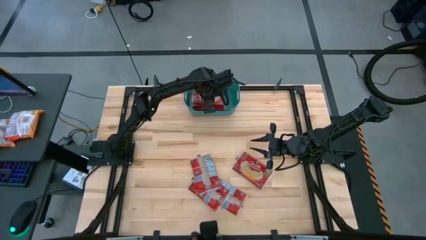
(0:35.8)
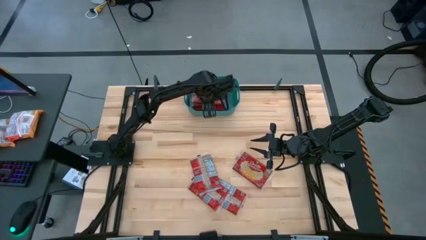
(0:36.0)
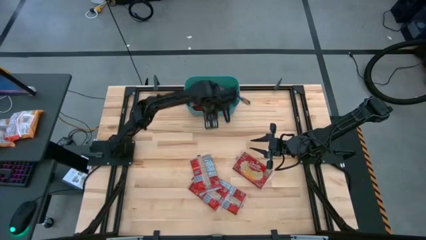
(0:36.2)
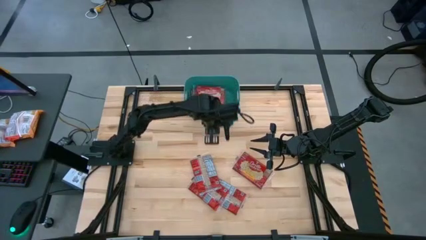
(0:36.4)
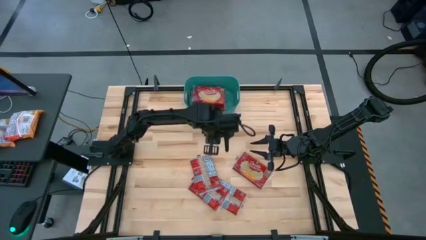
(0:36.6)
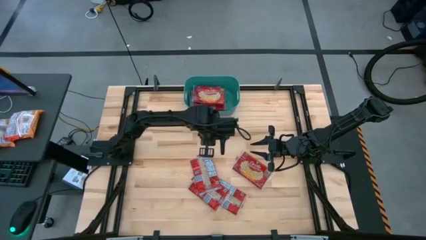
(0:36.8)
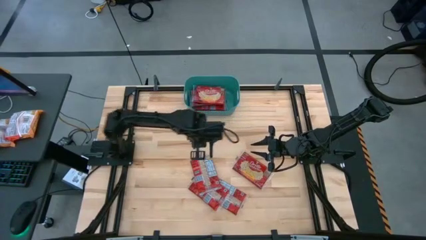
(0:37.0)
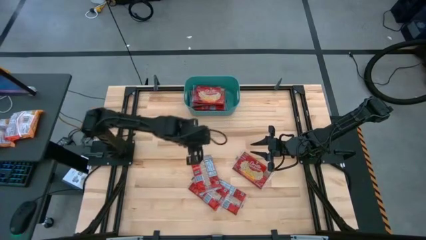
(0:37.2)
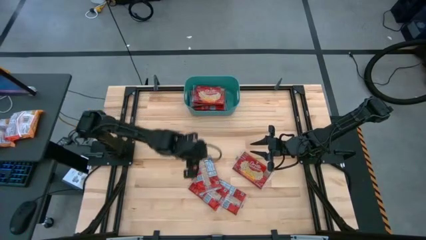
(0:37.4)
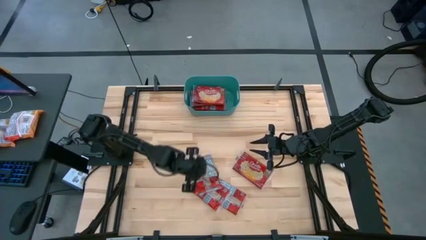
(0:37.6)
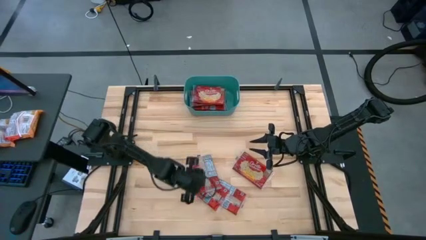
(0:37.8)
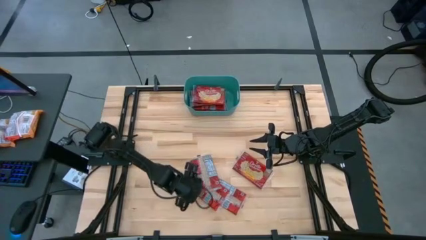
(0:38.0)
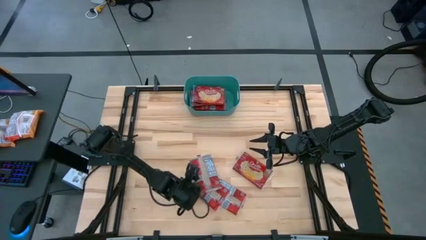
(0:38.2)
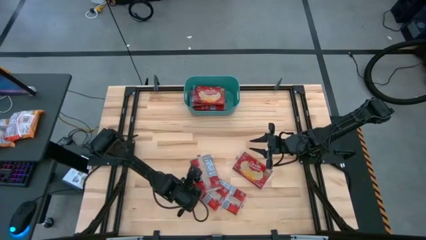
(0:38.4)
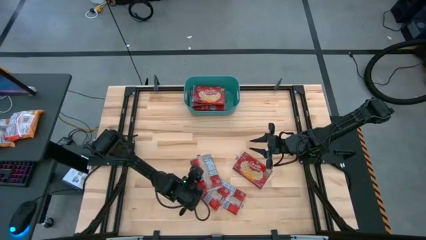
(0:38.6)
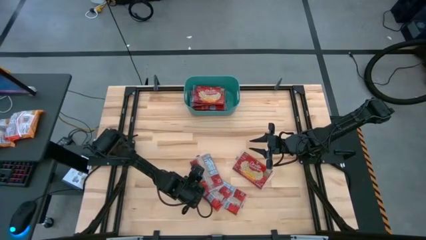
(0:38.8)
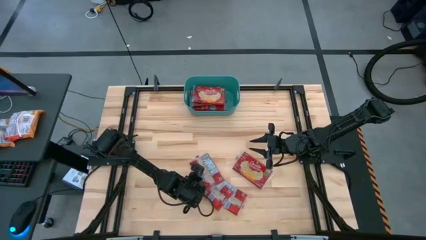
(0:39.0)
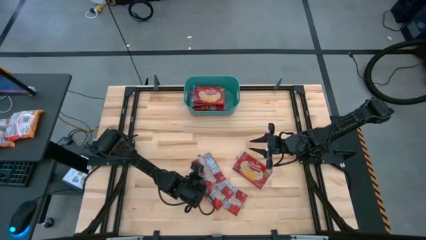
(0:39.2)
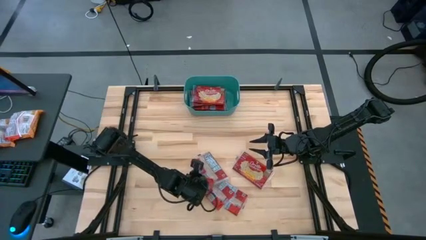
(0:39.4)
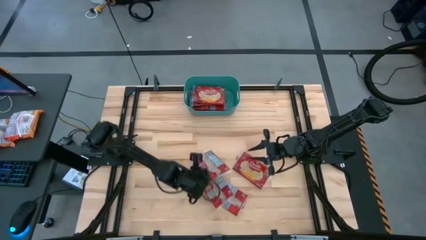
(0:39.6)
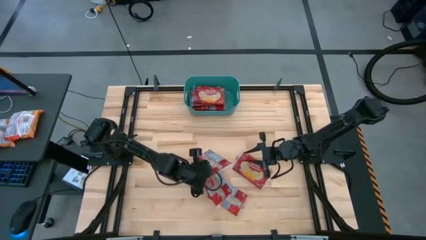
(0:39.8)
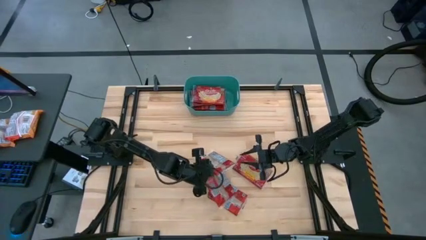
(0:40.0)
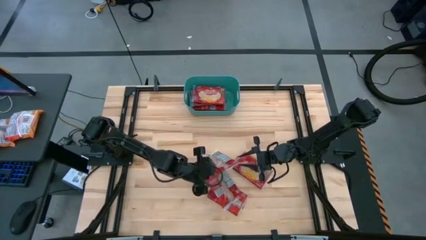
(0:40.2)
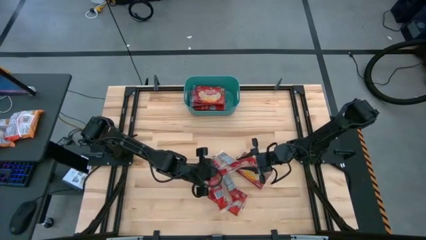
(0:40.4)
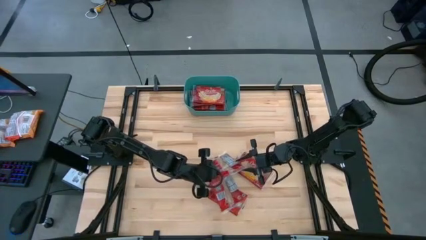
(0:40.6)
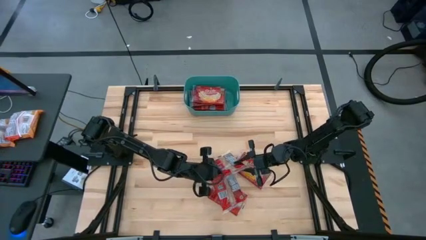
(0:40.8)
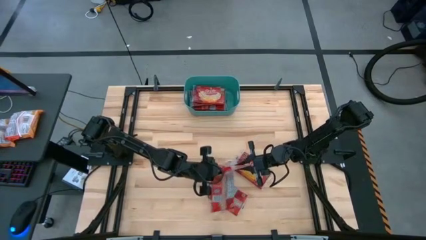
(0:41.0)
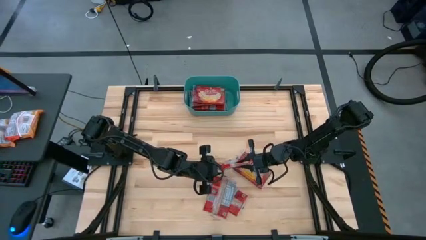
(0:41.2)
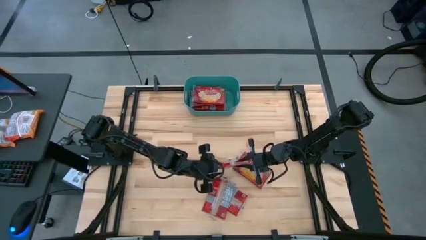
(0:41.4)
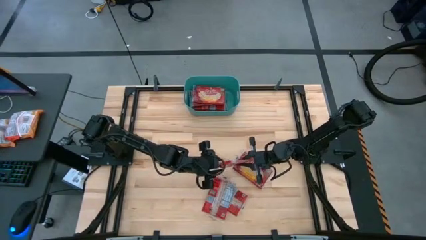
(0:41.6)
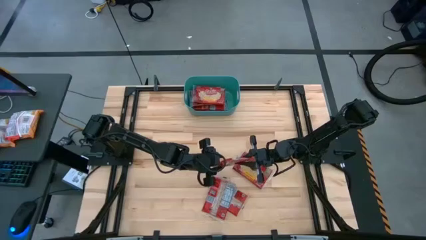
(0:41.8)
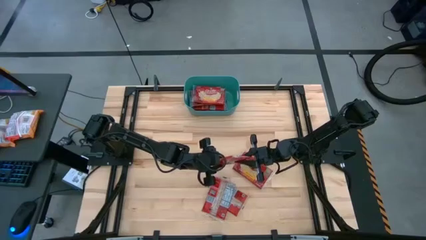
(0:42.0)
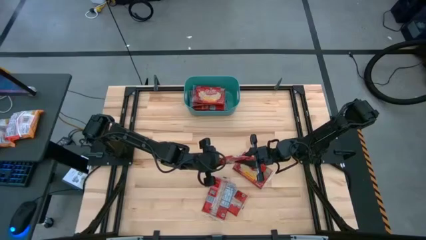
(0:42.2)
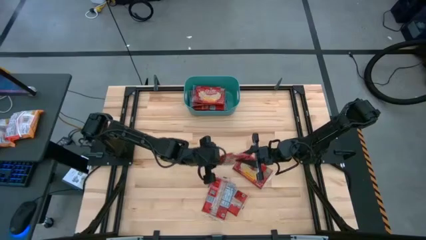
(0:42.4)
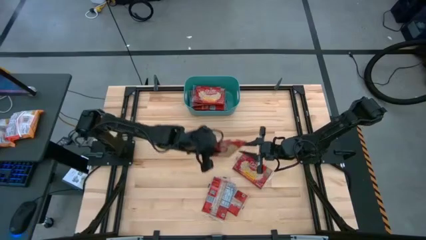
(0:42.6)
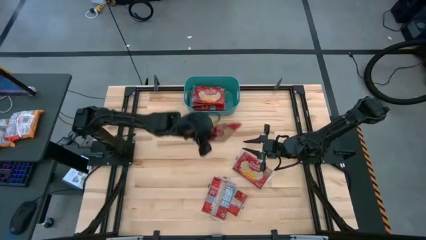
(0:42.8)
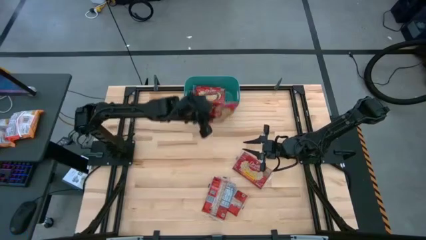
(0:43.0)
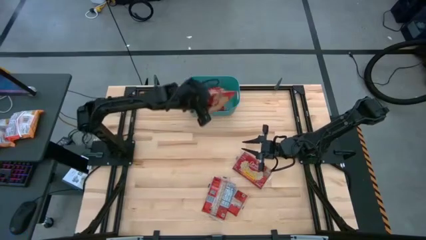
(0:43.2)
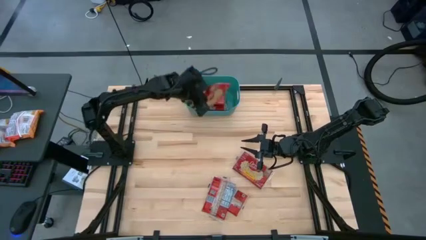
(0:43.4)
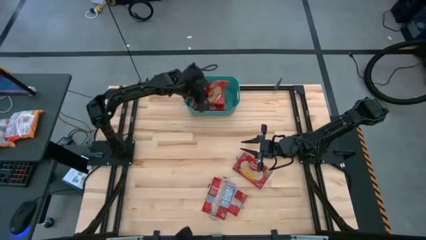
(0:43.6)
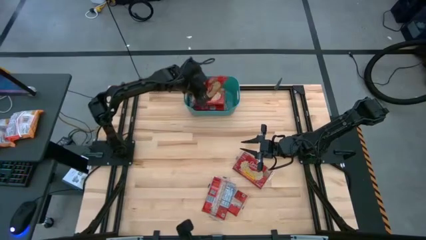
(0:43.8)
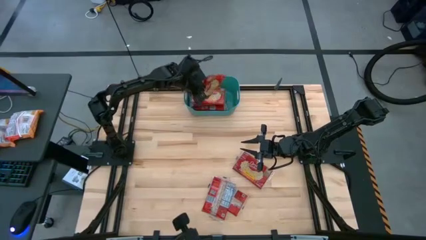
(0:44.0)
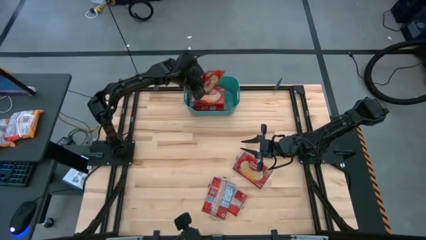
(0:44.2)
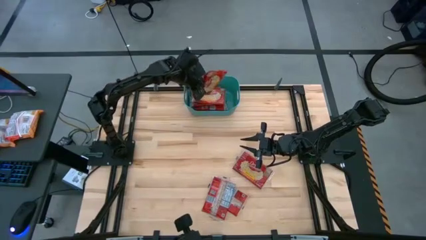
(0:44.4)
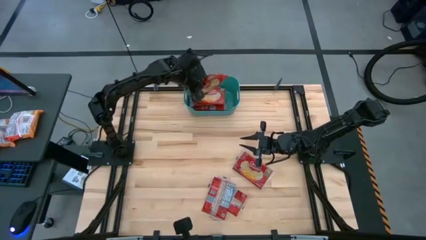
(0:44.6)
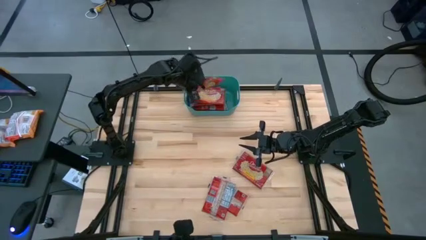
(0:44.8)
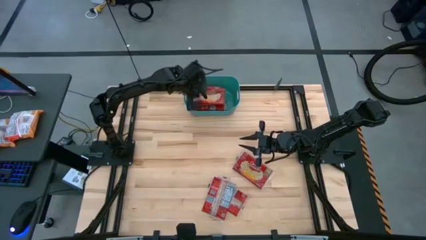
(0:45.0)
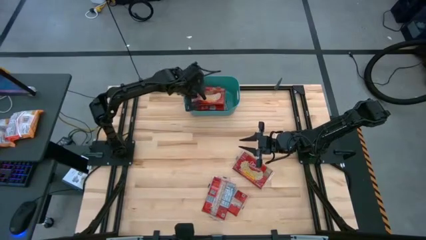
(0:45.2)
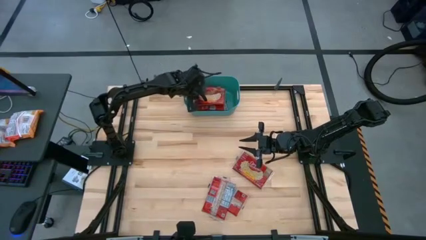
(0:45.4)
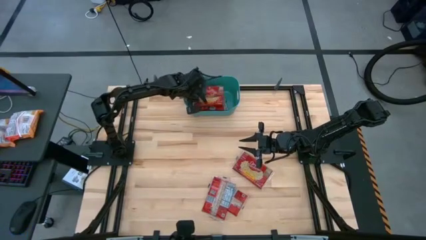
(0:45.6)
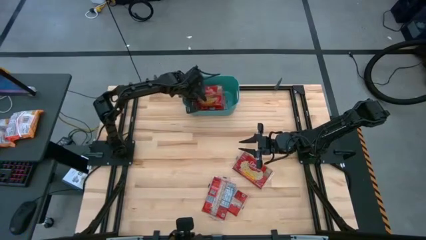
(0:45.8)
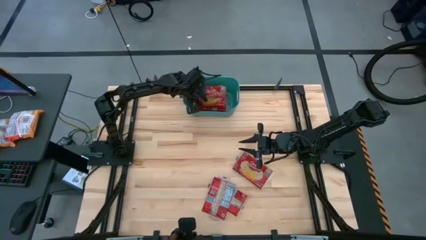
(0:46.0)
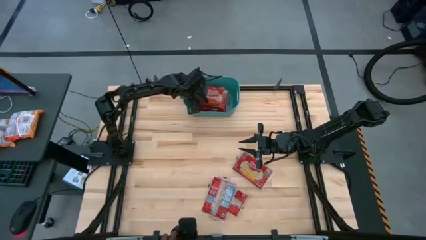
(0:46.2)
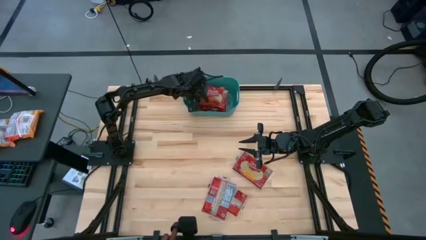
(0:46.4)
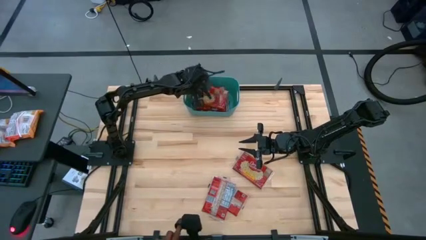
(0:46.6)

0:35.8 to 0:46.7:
Task: Sort popcorn bags into baskets
Put the popcorn bag into the green bin

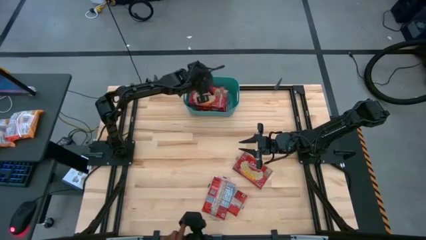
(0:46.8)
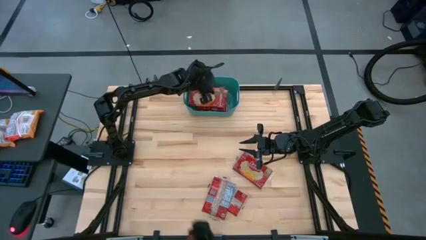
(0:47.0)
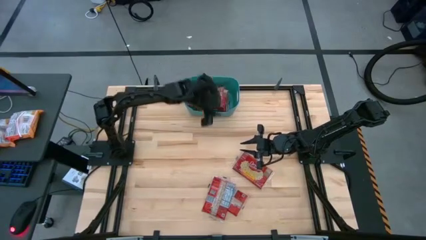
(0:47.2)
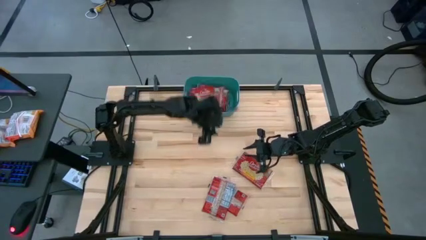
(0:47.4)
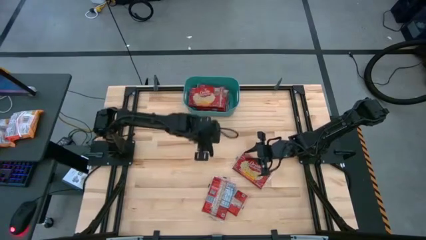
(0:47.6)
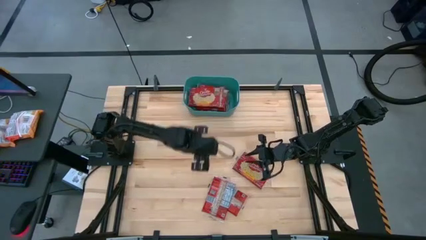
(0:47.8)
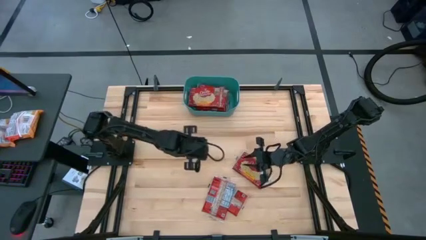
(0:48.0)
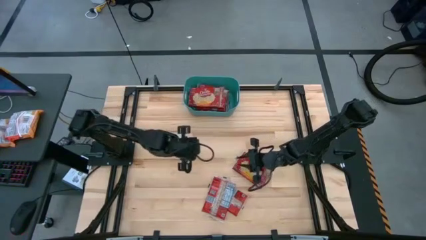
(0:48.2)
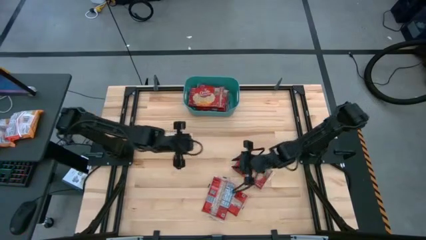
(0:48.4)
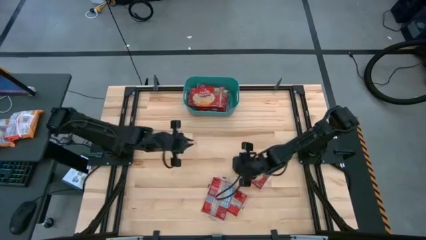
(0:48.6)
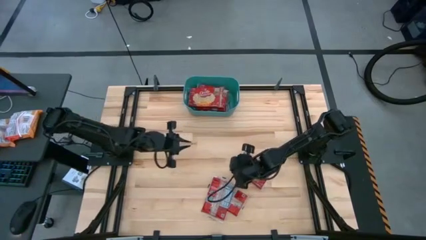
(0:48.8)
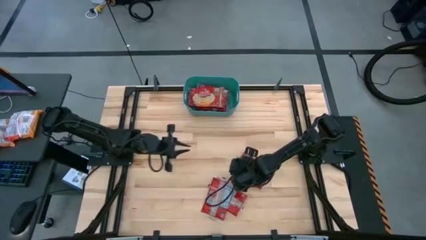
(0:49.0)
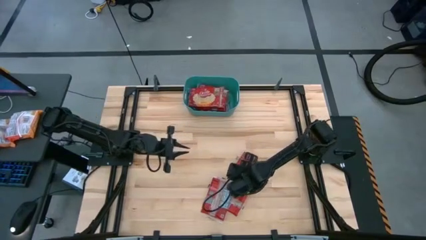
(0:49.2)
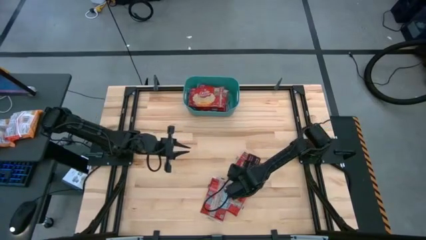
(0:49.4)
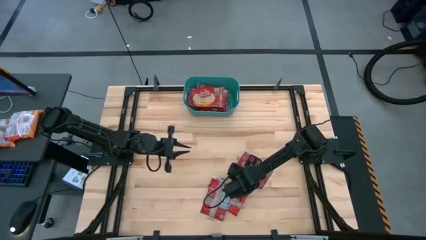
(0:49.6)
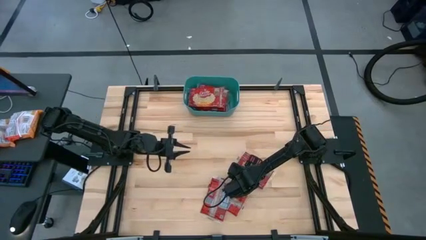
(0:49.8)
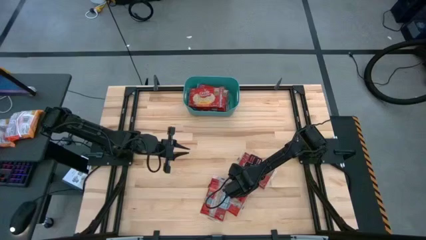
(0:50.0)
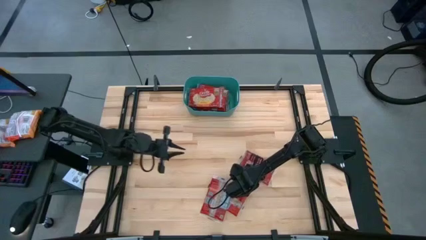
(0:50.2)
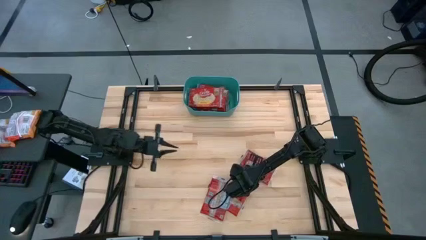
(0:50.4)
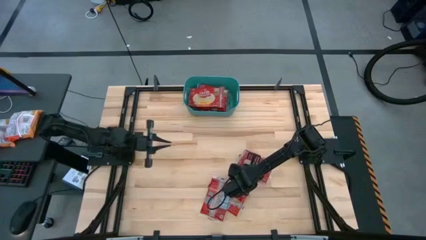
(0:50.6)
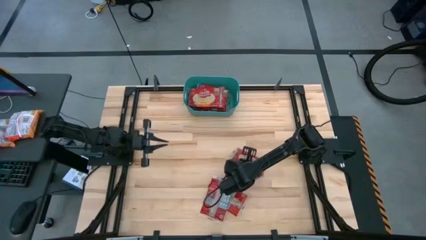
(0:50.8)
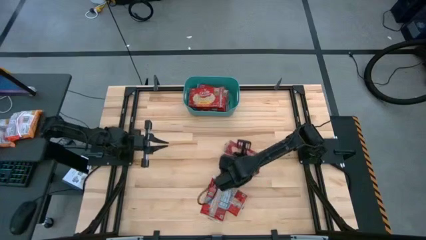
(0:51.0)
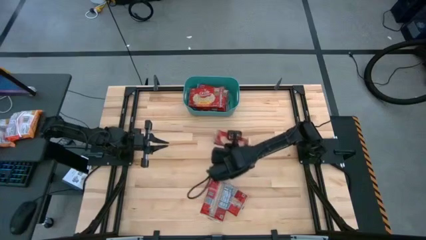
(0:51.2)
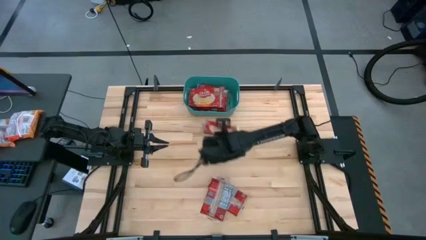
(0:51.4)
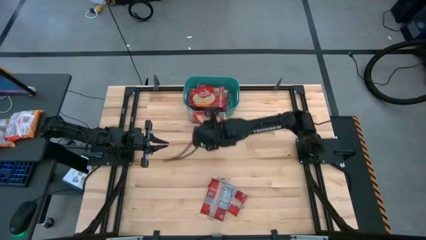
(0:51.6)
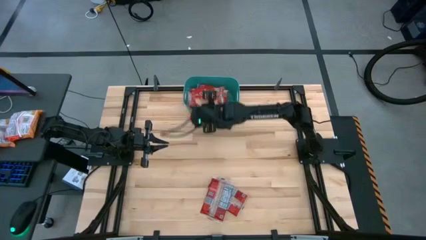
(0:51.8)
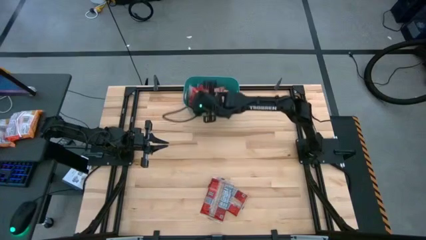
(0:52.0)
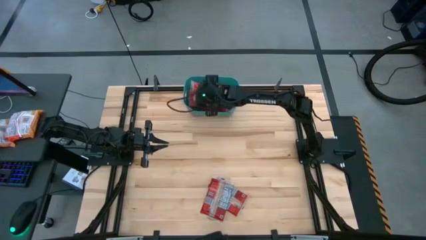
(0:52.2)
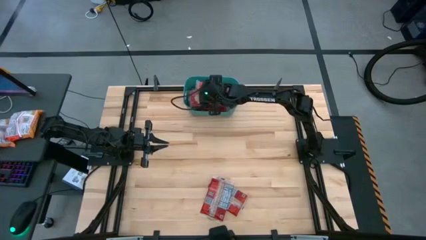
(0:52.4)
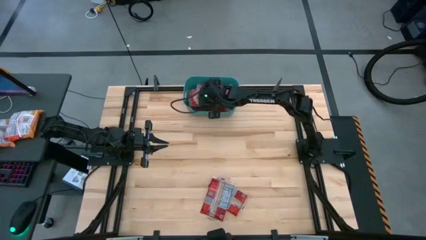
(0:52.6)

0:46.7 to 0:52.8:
Put the popcorn bag into the green bin
